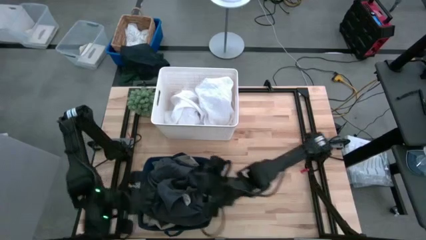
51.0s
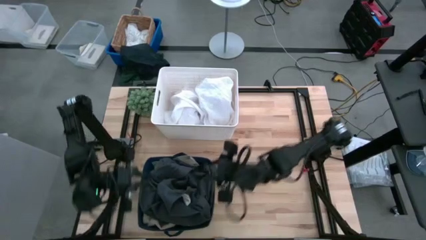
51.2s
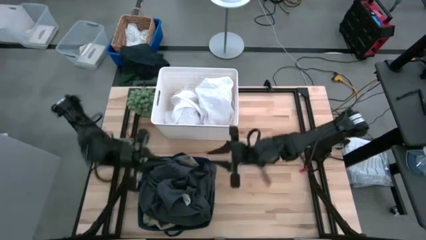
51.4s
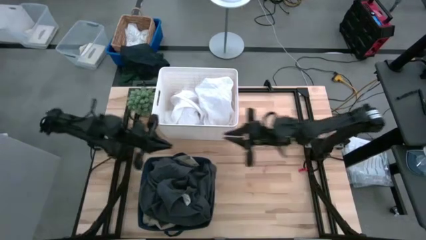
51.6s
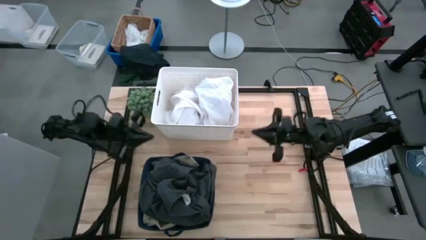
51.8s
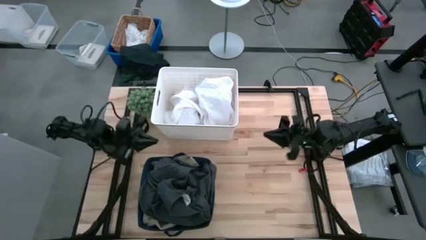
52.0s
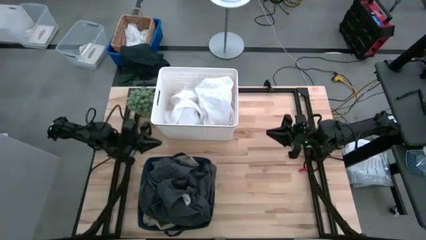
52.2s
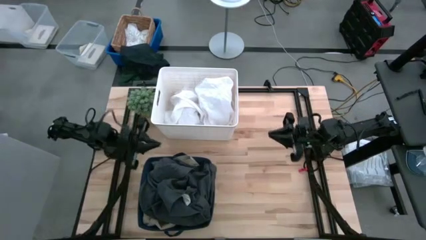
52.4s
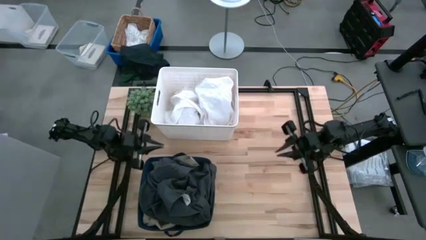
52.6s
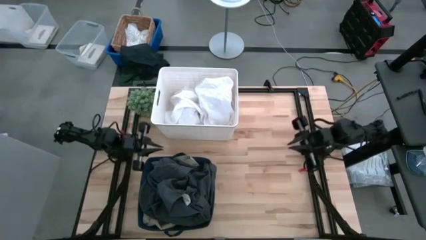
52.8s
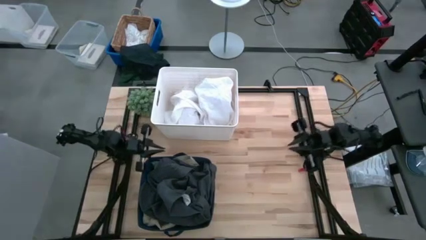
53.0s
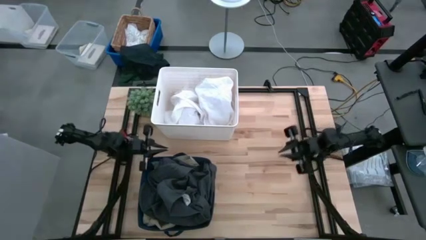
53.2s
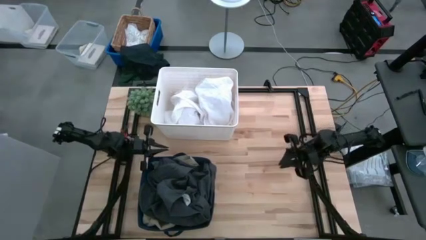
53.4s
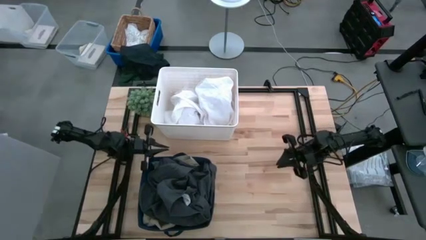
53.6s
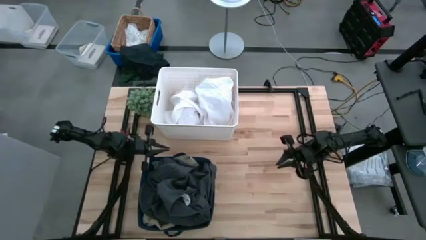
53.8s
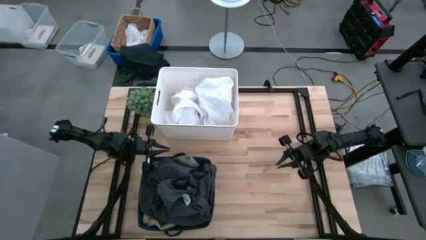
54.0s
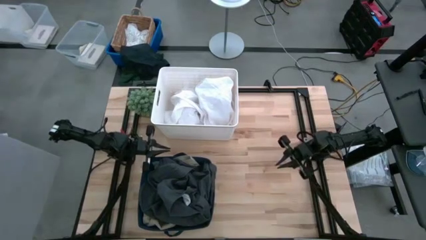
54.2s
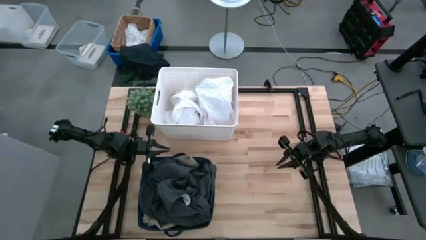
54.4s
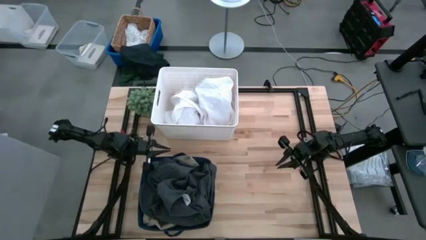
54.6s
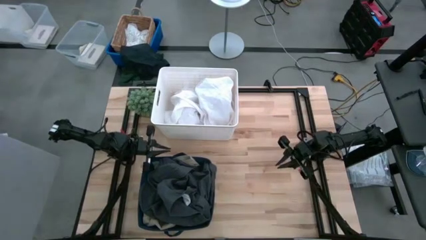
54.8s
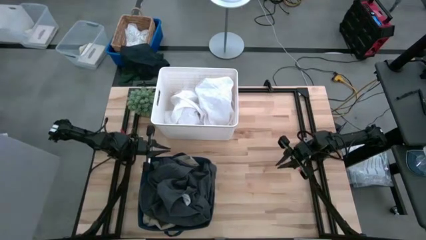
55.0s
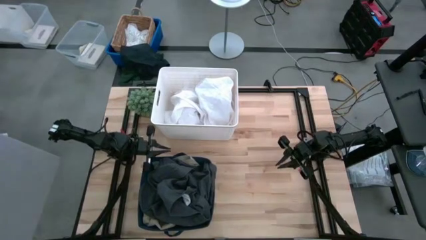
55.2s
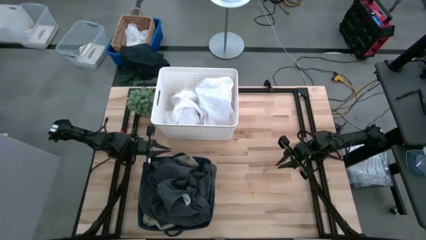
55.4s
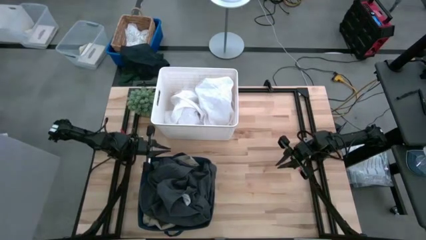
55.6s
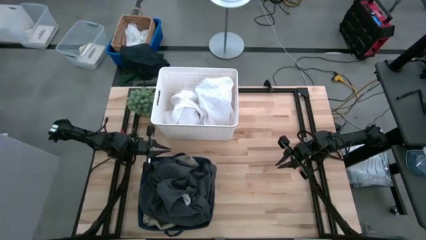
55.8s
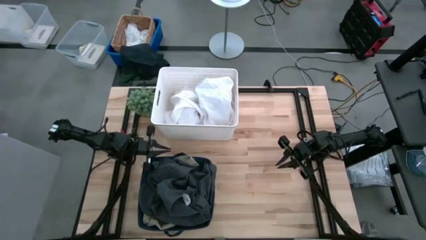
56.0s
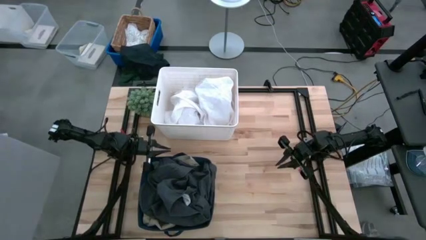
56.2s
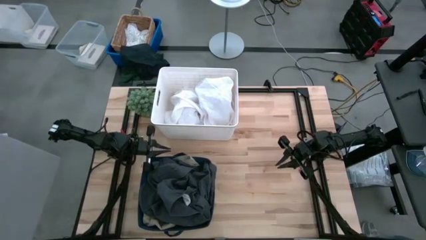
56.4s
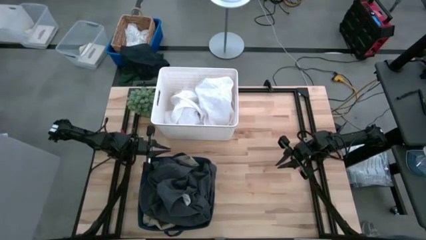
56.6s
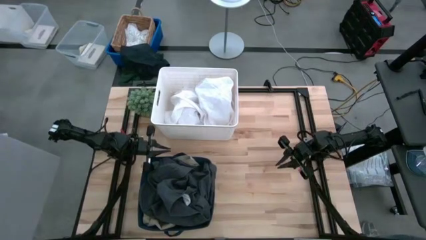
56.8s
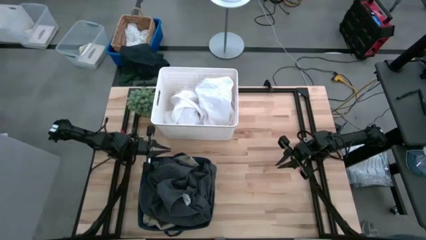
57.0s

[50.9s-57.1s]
Task: Sort clothes
Return to Home Position

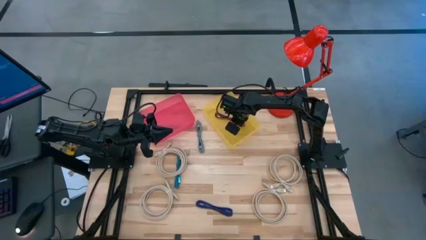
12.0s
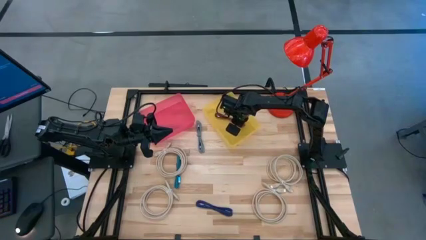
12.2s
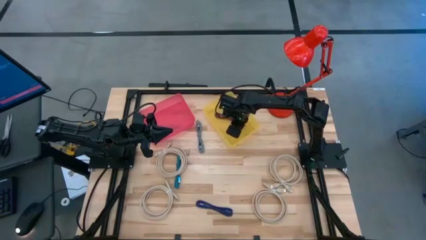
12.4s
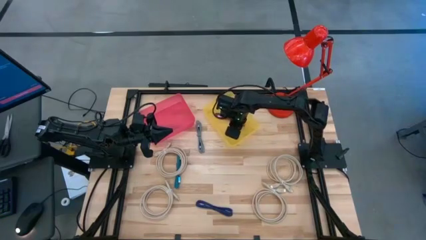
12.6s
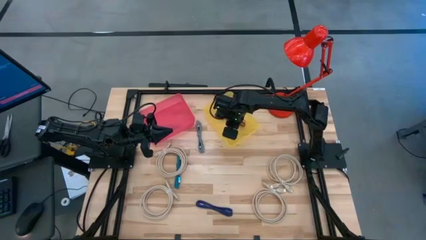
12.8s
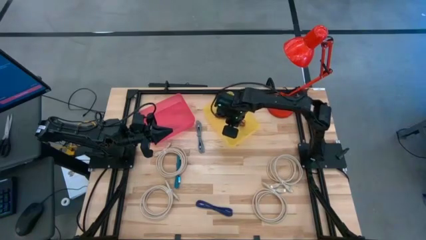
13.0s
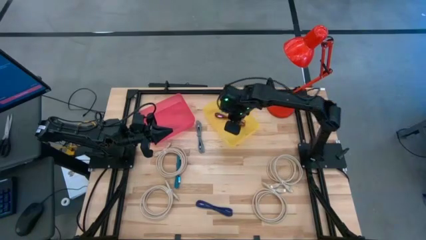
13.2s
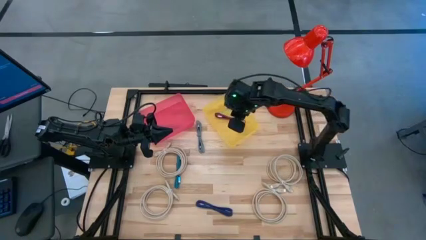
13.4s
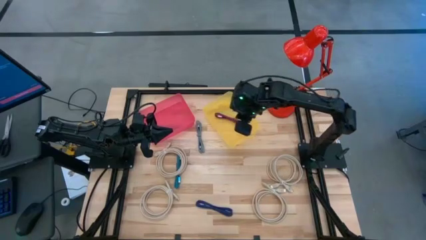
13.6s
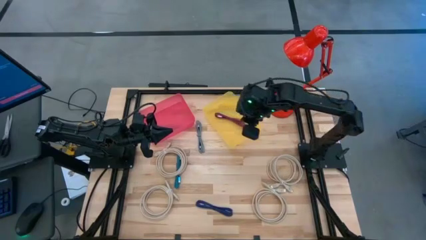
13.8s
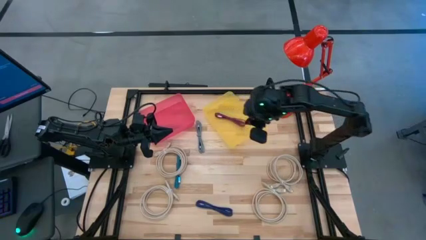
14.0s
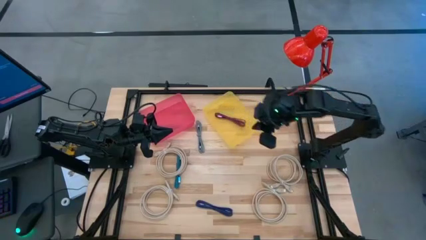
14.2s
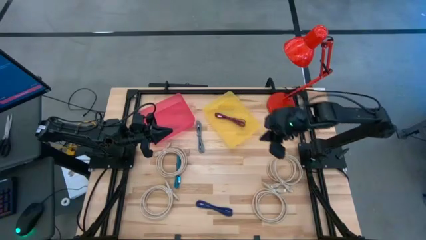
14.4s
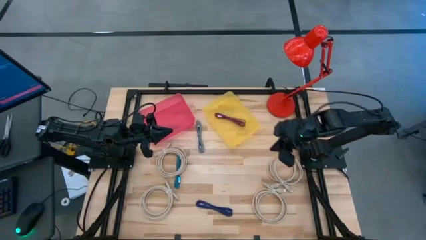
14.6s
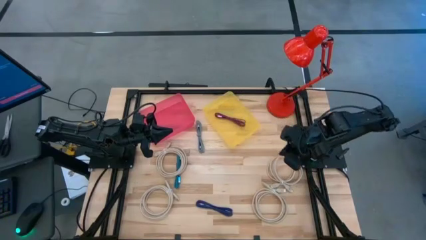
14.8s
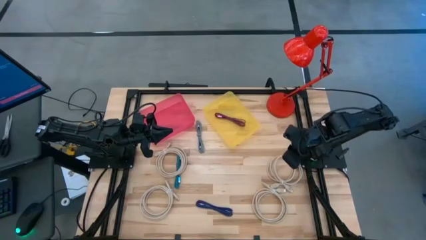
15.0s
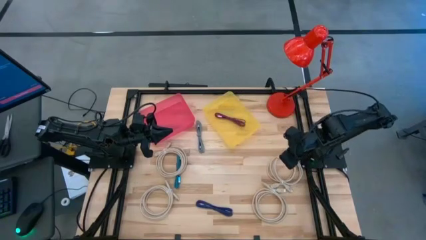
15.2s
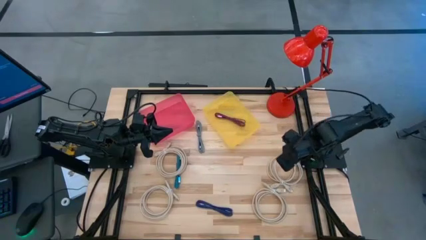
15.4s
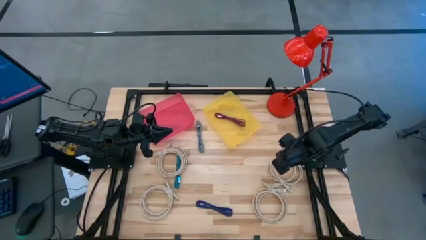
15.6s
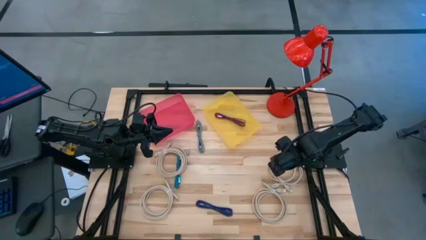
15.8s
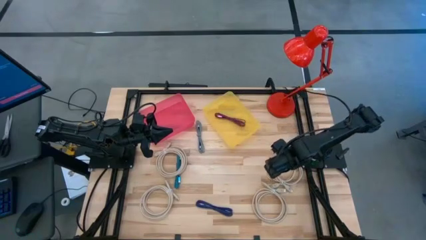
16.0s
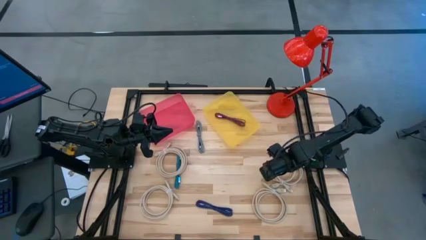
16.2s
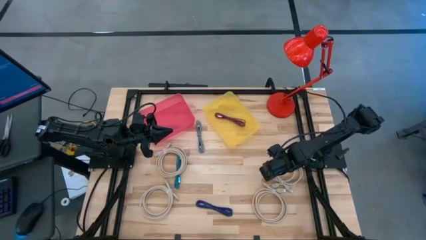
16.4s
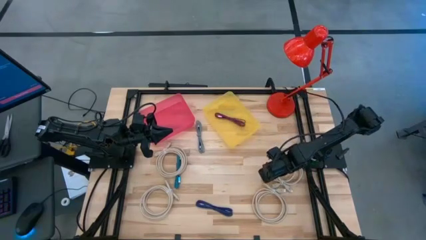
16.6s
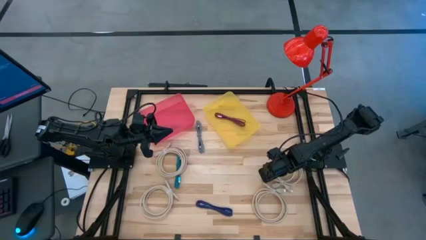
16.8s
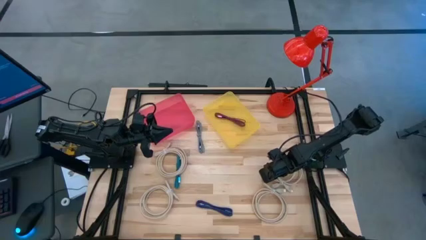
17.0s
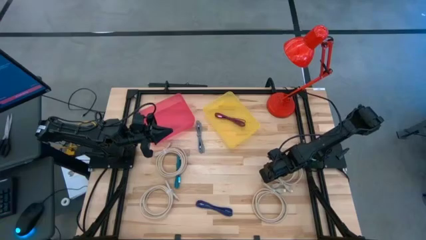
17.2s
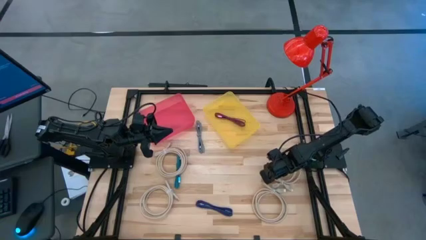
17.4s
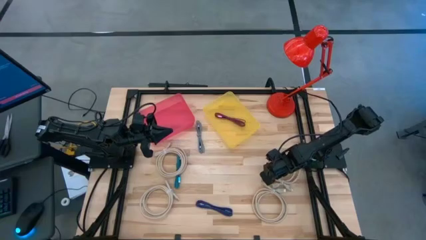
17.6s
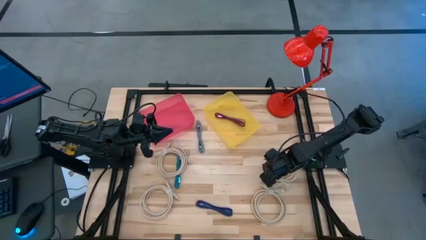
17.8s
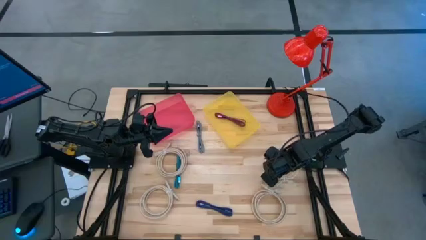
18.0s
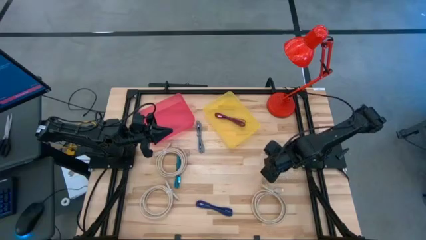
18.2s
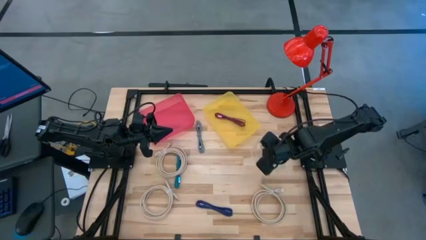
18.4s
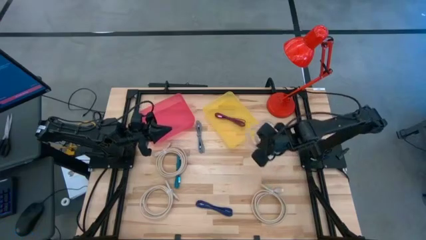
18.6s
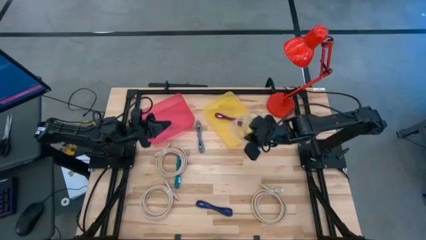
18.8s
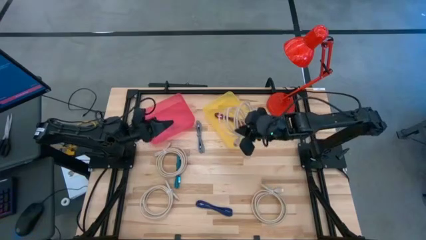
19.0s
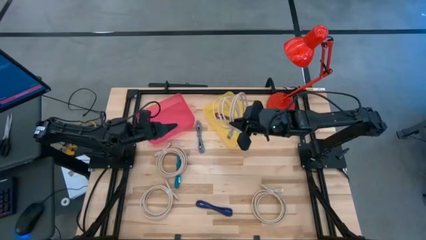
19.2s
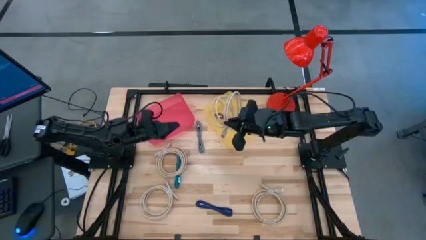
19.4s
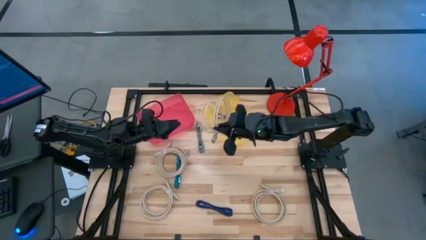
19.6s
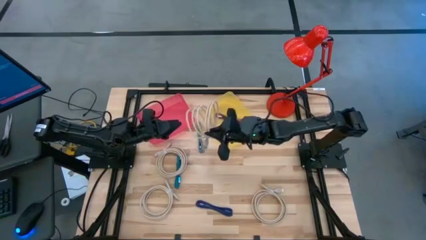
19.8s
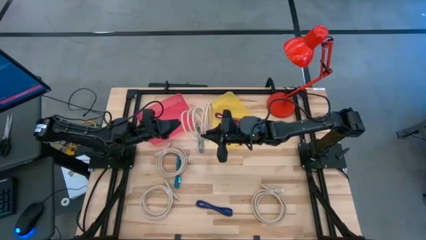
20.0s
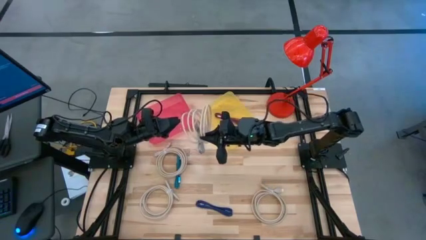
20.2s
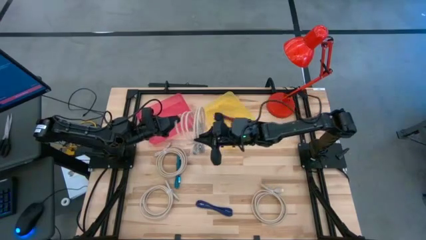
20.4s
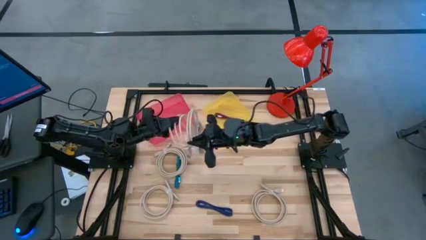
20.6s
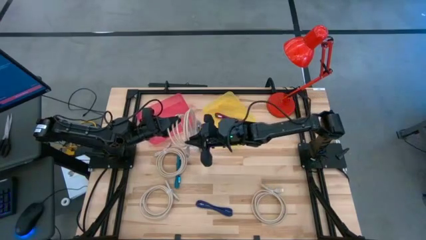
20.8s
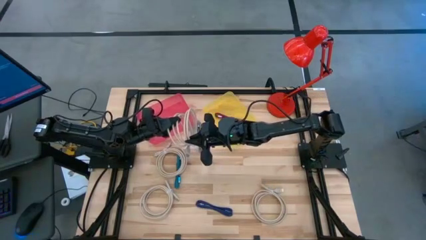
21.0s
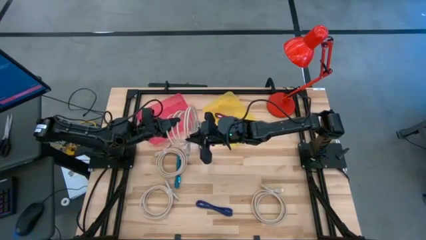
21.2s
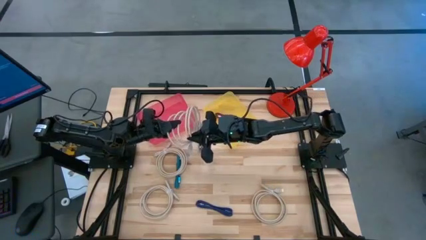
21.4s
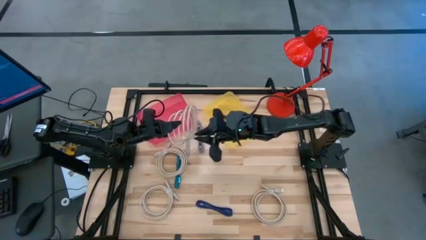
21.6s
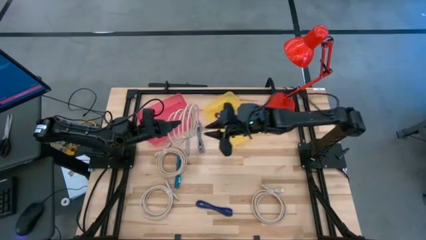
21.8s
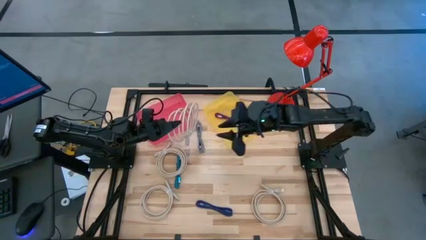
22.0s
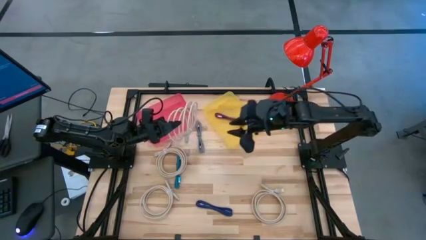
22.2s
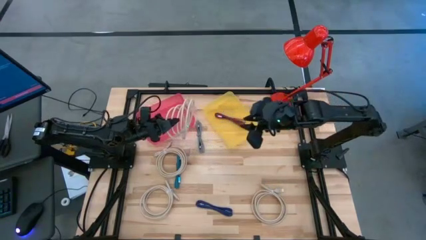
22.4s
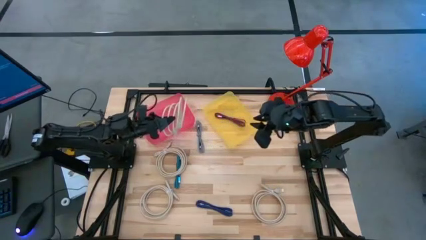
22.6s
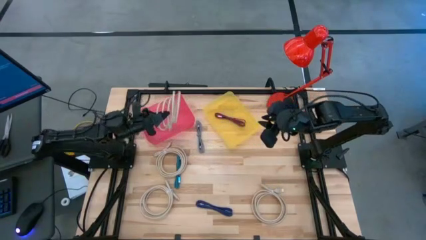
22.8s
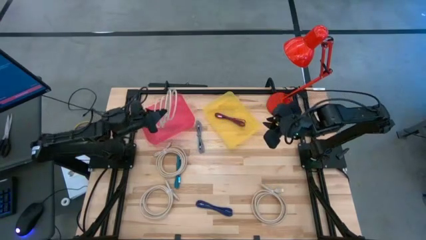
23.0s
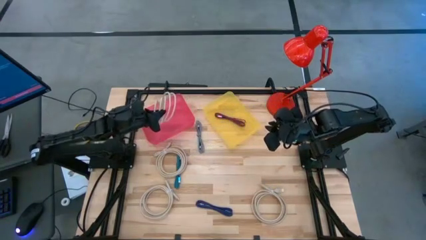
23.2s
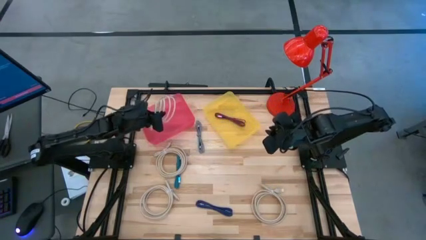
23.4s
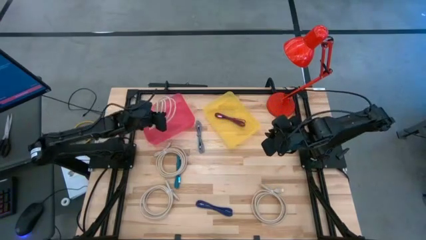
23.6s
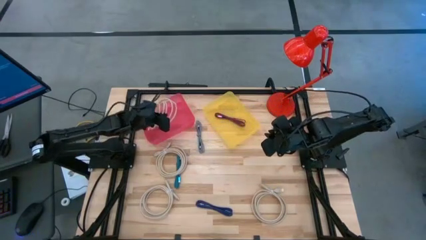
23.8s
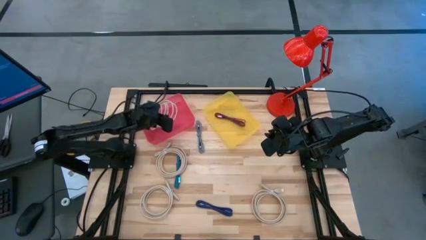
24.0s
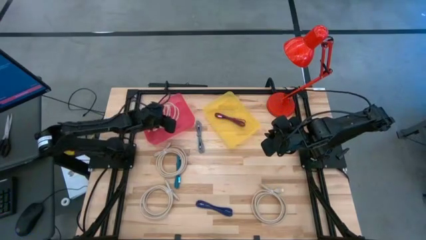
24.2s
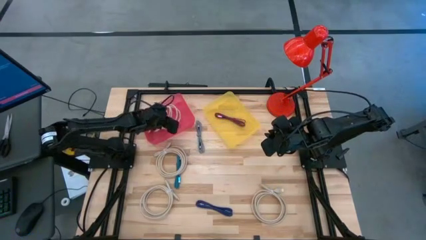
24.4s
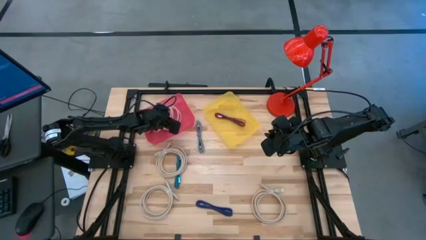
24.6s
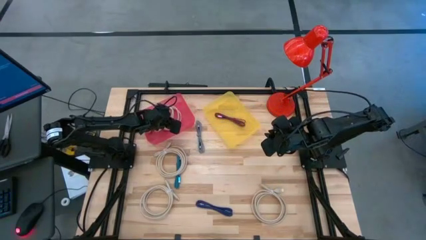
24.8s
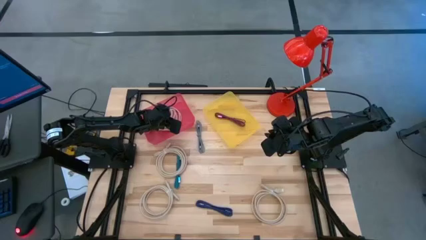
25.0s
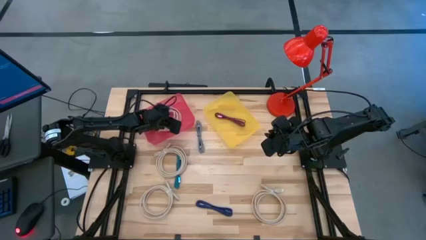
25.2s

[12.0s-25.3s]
Task: Pick & Place USB Port
Put the white HDMI cable into the pink transparent bin
